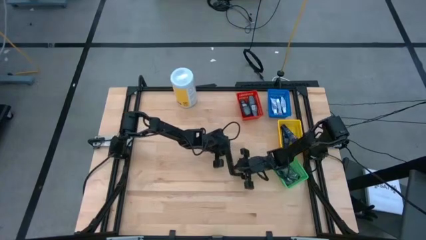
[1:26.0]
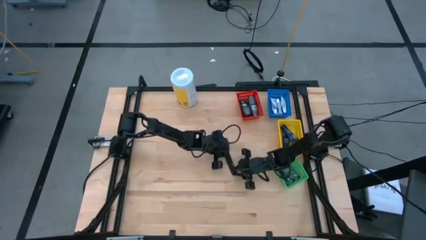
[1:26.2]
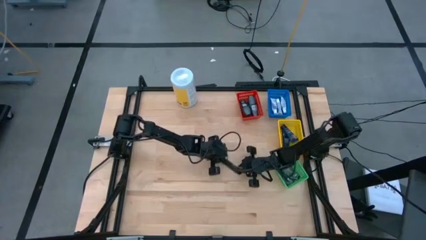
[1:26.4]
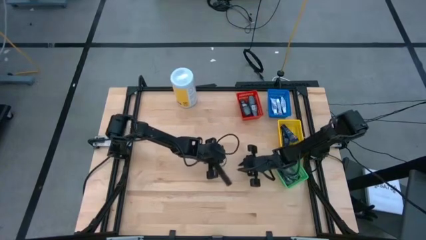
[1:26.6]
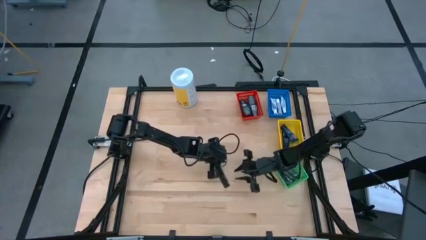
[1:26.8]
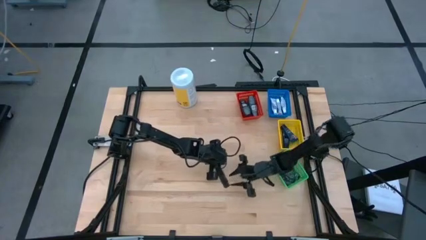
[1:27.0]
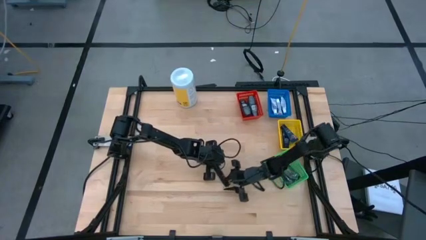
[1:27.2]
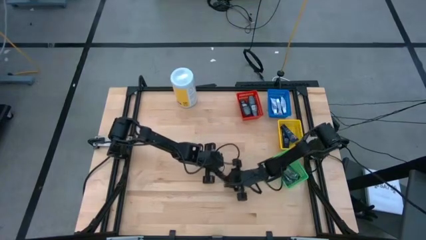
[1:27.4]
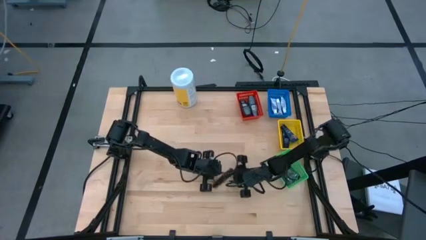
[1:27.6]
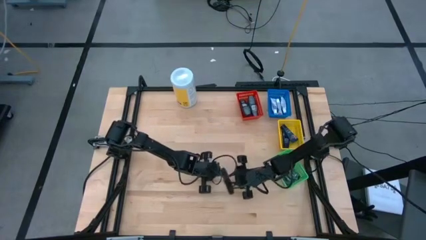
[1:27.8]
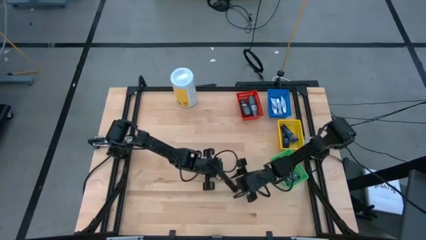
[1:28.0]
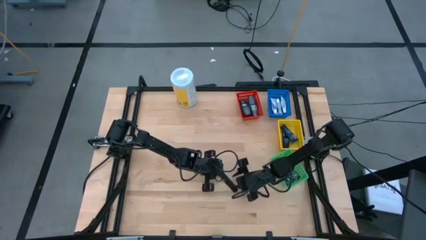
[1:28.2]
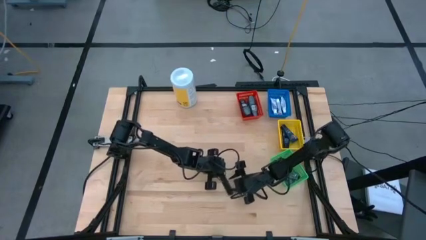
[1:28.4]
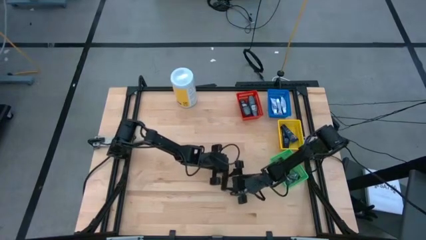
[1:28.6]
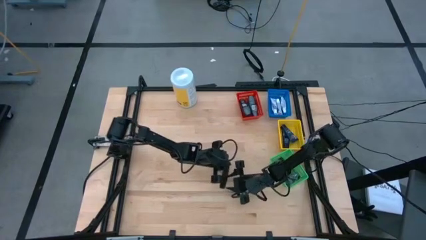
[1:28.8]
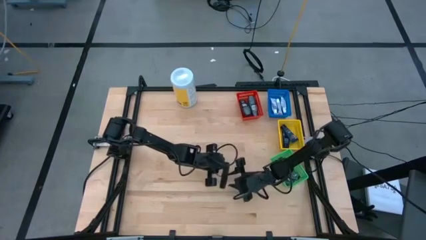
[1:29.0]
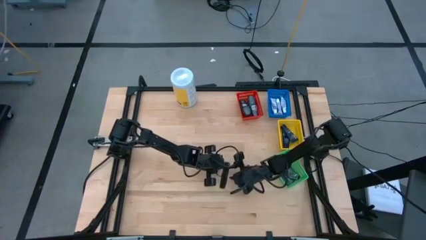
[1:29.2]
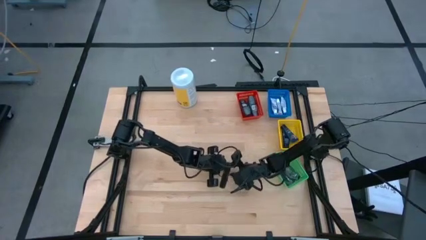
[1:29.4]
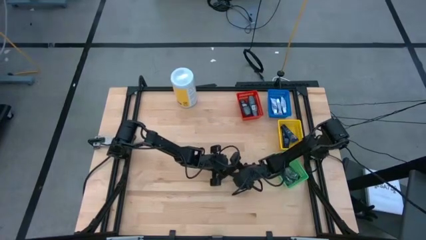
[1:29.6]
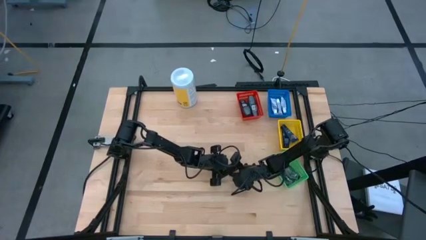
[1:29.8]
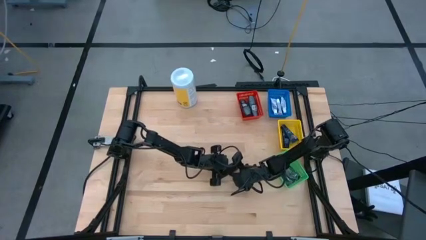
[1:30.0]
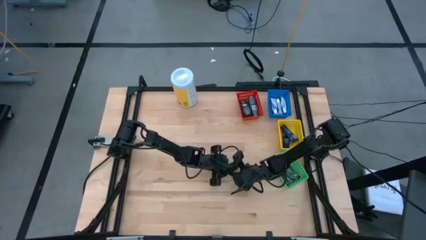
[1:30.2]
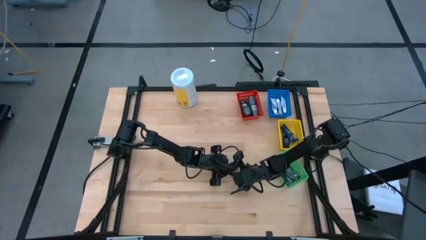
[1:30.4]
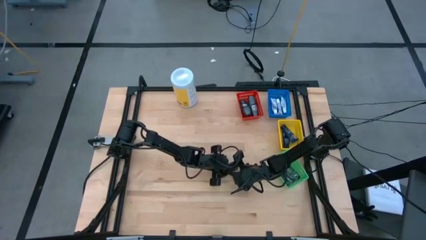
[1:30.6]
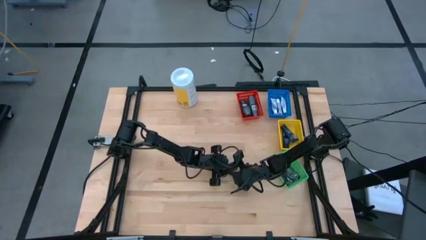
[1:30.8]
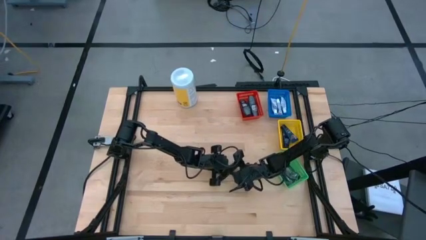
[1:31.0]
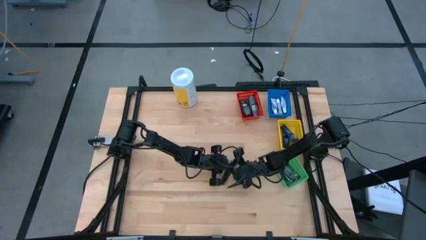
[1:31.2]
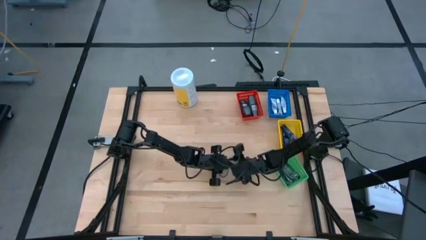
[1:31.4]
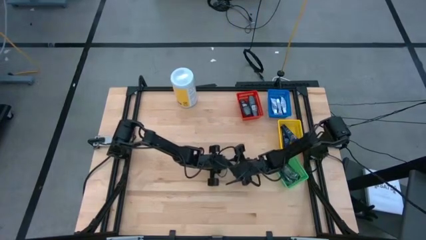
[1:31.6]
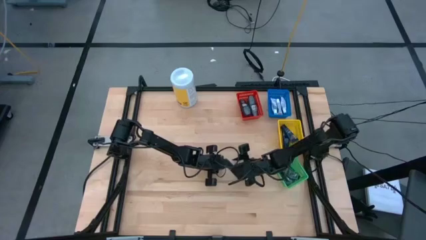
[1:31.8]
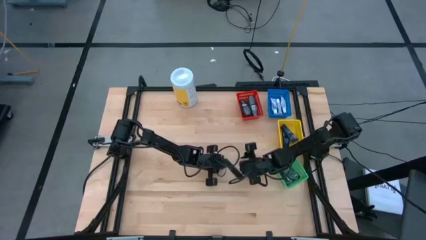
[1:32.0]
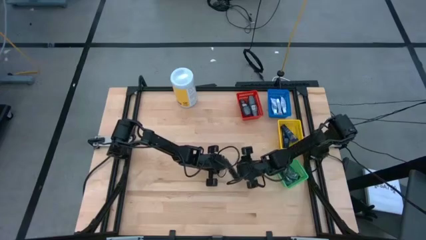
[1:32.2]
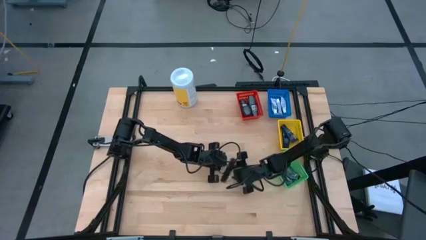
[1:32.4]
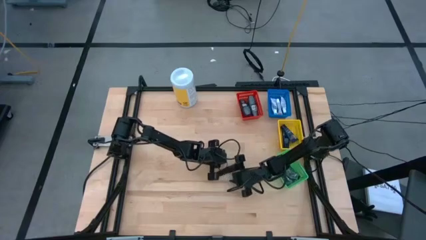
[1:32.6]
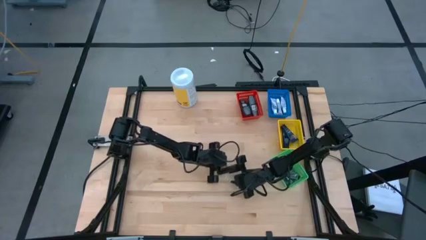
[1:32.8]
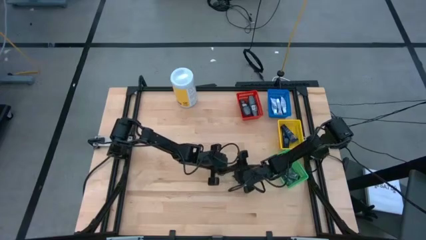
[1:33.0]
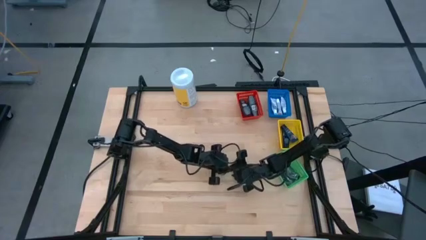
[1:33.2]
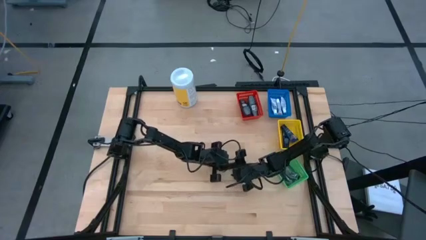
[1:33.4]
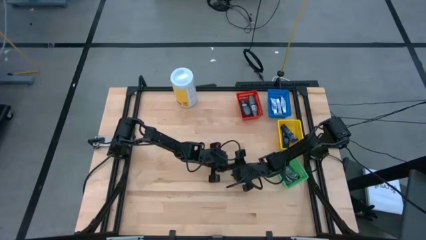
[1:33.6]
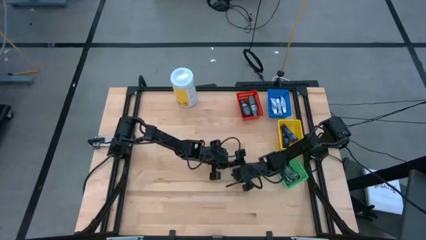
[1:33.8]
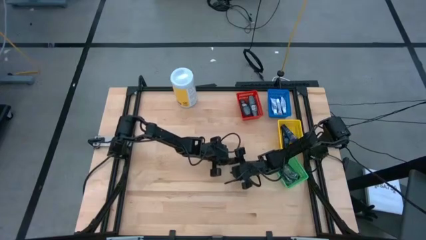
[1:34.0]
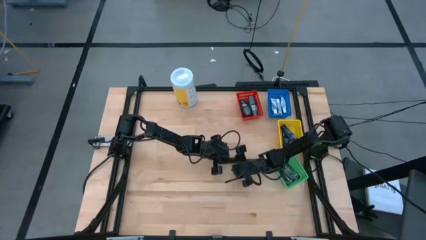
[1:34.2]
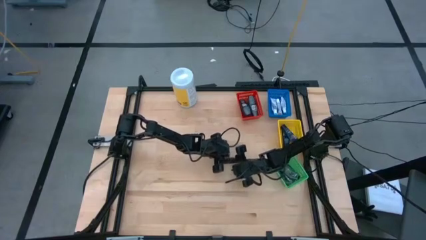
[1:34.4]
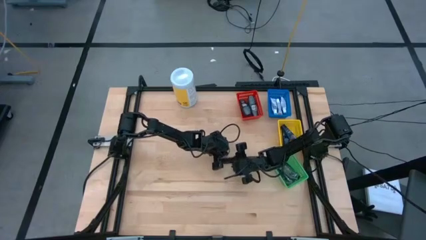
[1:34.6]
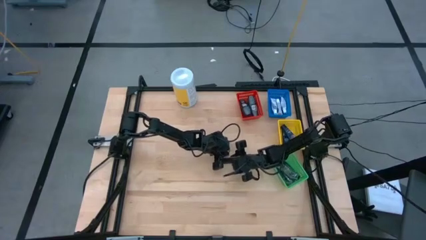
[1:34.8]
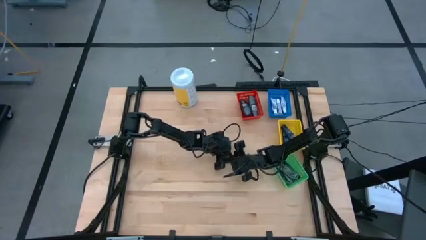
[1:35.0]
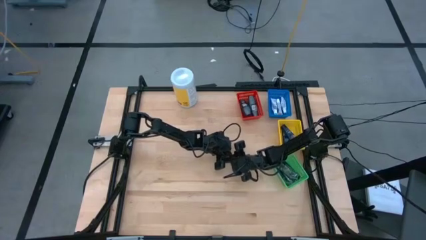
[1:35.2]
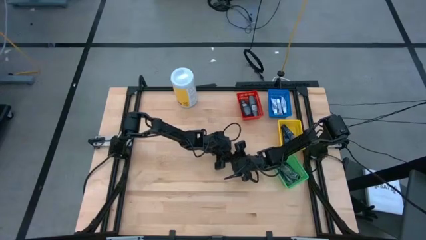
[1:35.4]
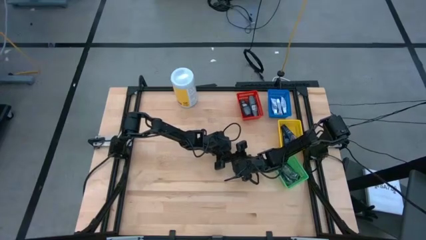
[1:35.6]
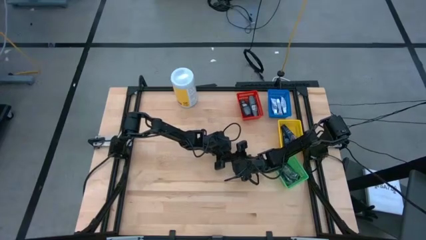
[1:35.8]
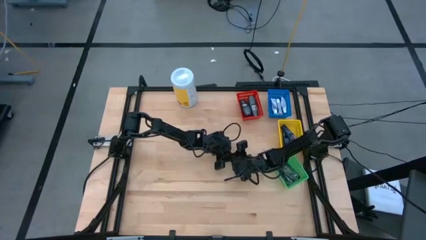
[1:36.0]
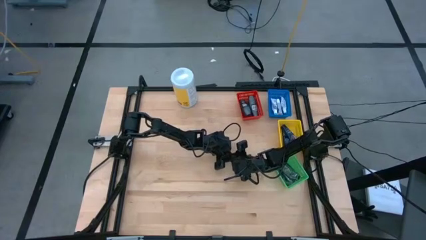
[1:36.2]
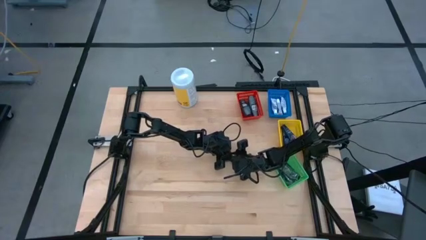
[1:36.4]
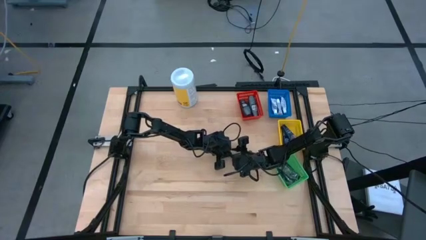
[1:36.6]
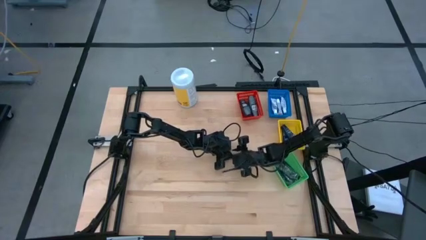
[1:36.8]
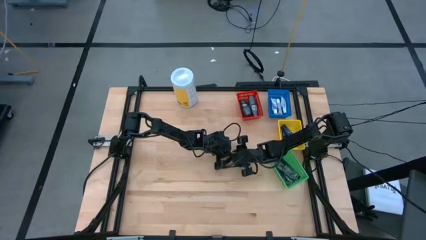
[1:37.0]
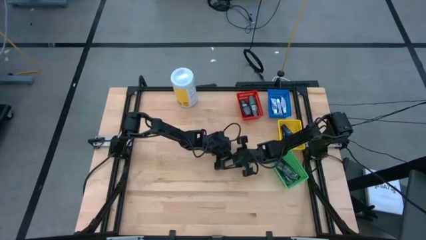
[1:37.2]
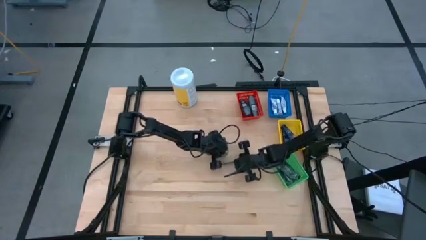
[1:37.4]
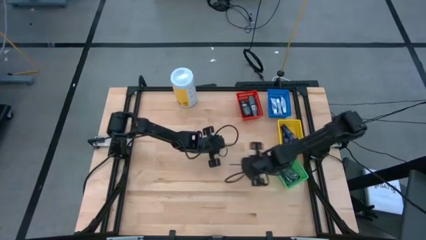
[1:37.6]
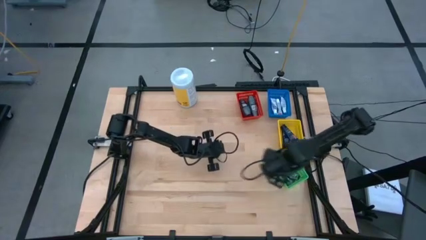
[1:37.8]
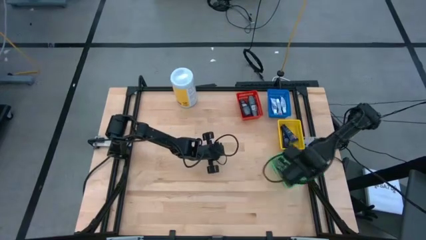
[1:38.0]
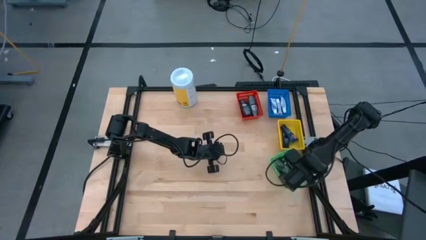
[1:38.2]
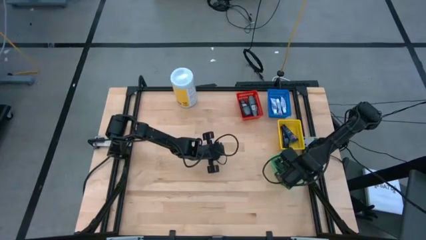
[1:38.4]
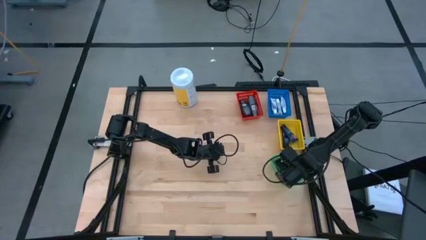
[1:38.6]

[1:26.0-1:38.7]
Task: Pick & Place Travel size toiletries
Put the black comb into the green bin

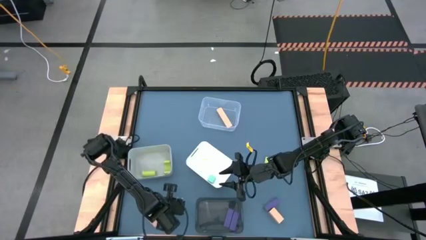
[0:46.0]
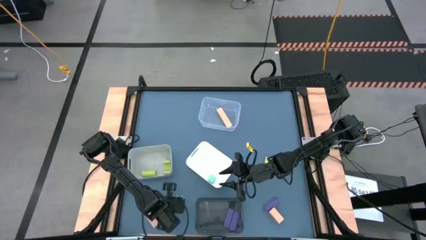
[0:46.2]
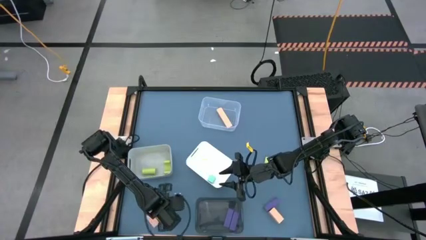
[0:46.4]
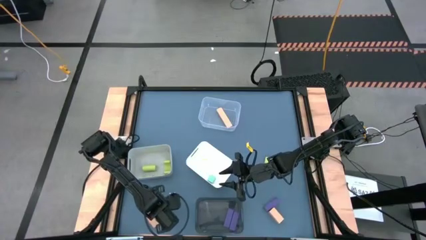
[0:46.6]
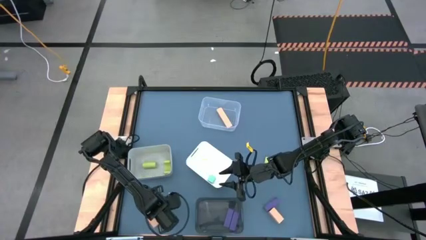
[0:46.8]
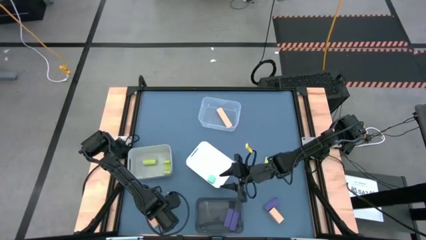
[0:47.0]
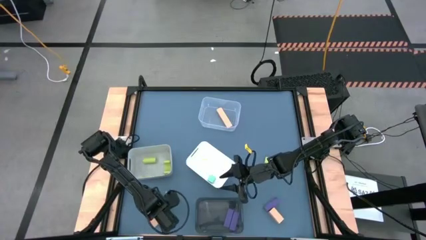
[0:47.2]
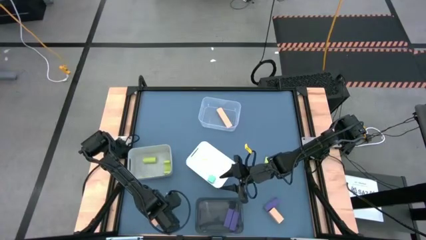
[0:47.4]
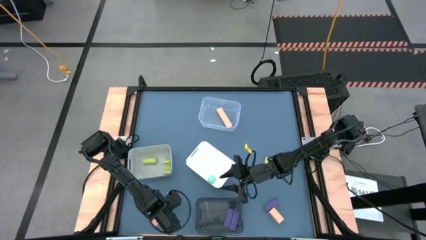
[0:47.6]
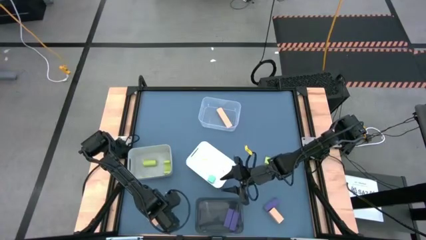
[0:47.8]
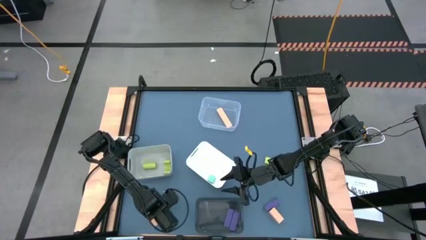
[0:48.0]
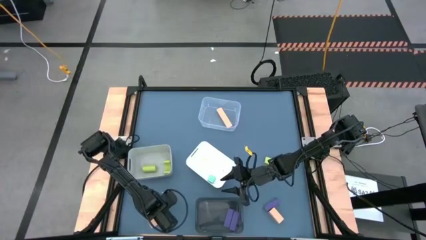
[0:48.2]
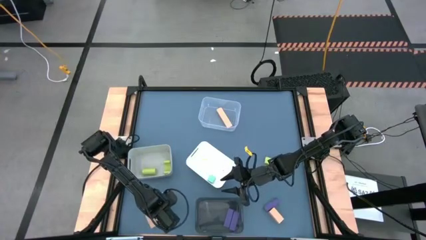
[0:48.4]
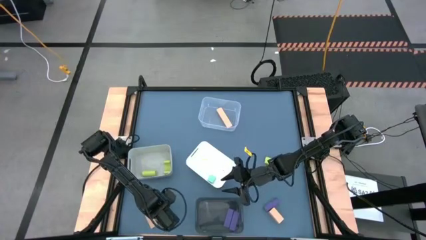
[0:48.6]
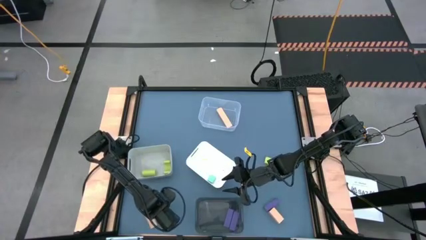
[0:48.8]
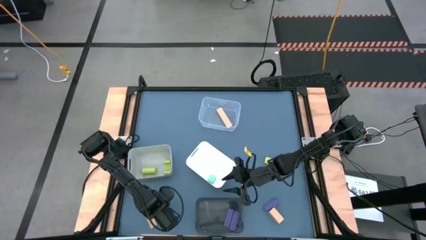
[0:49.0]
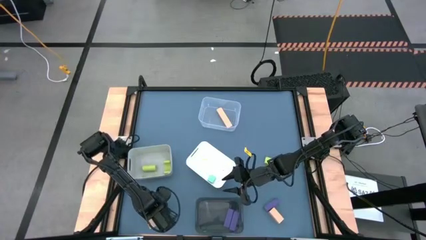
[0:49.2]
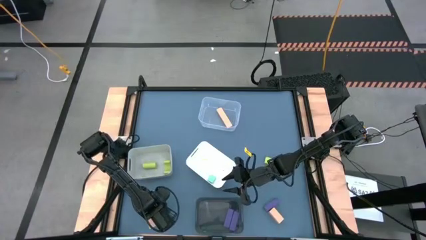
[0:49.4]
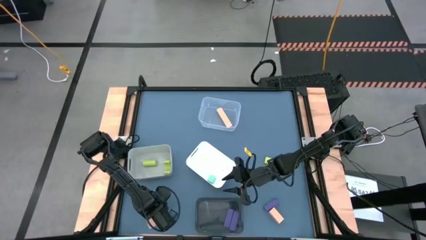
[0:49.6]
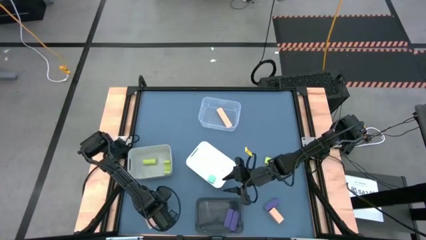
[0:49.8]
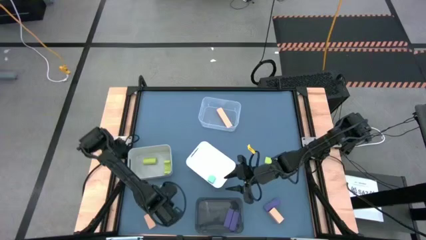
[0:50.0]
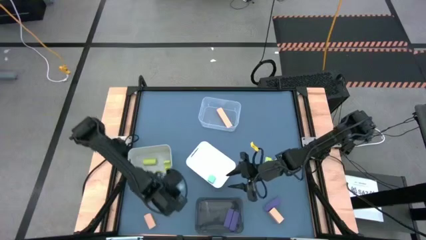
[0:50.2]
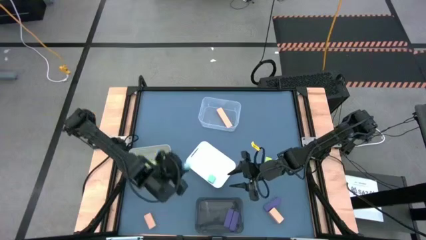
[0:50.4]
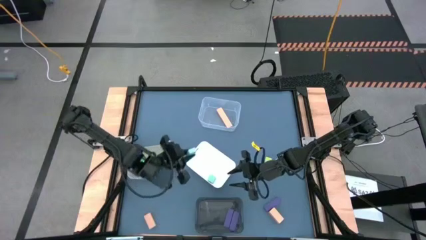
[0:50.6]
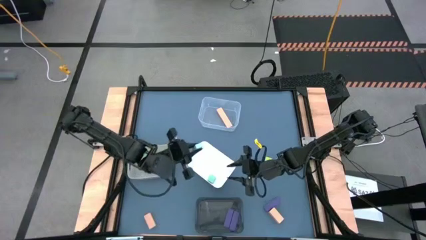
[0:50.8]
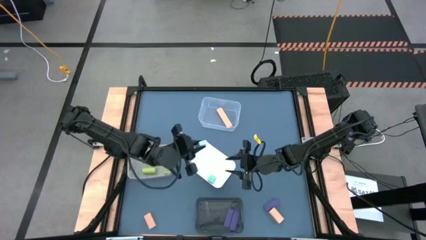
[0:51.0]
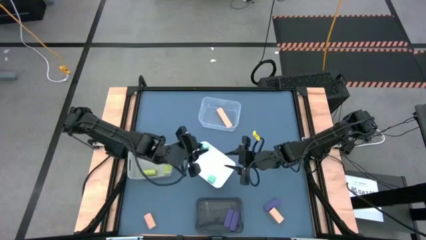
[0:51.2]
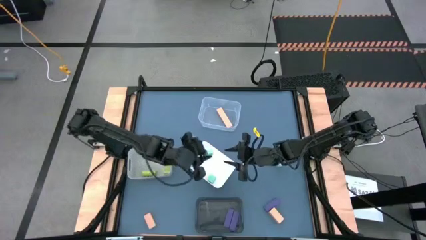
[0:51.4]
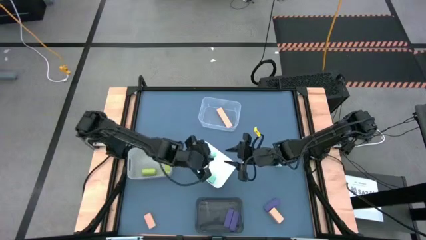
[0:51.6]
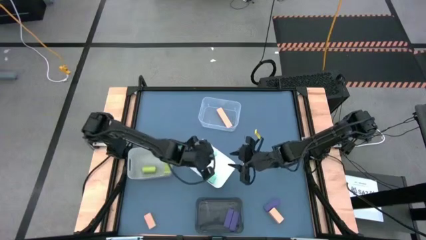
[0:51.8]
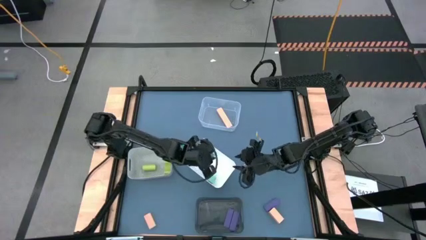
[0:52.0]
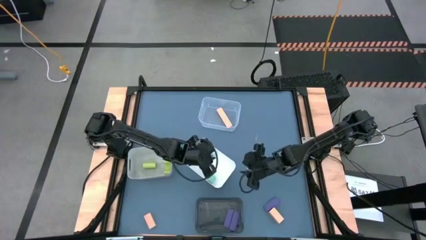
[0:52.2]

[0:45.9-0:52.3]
Task: Sort & place blocks by color
Put the left blue block into the white bin
